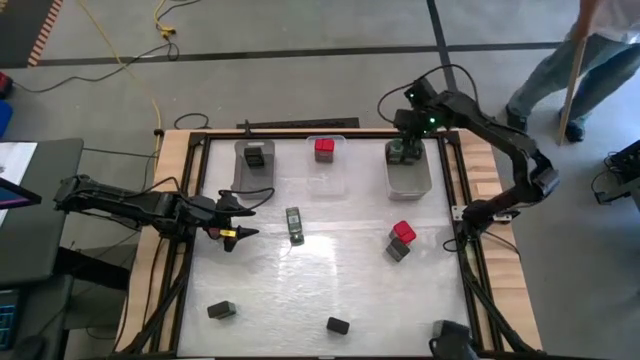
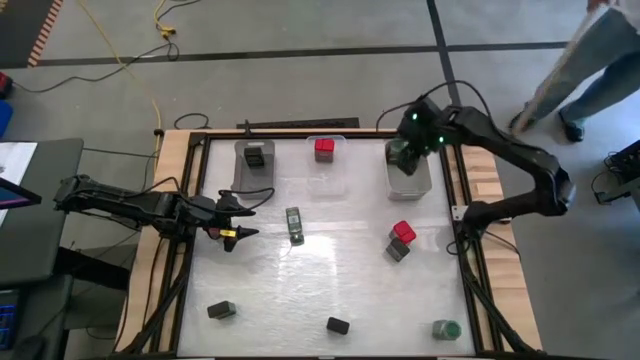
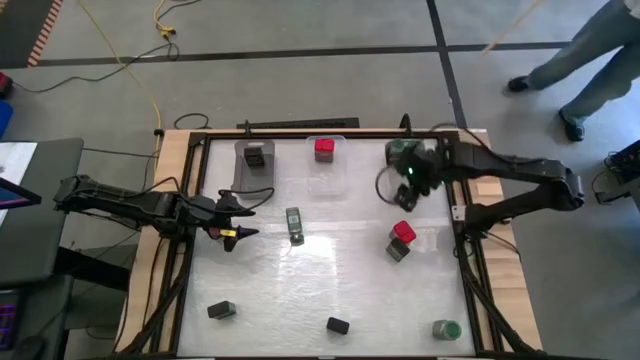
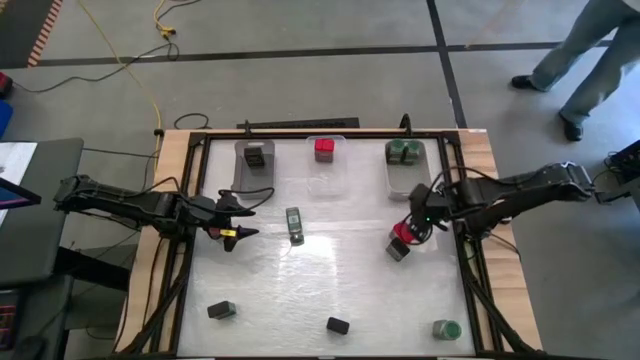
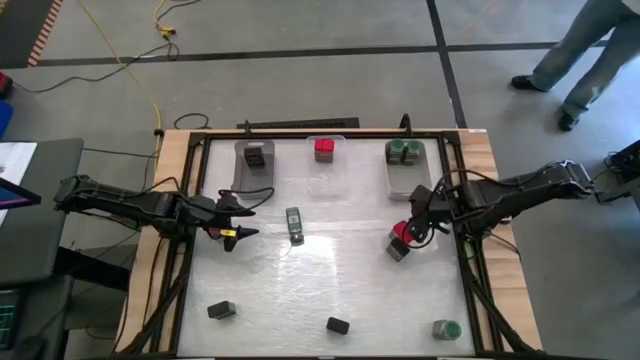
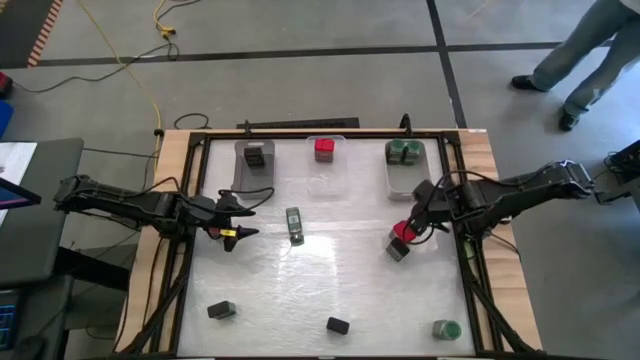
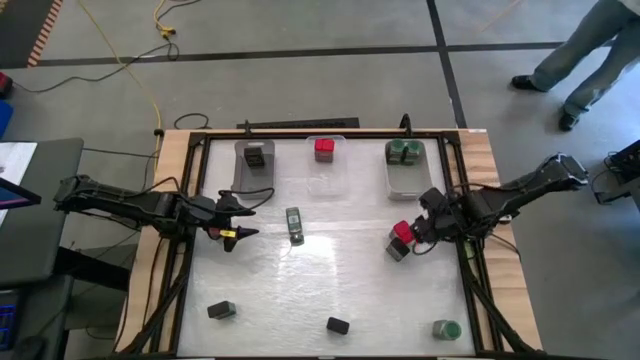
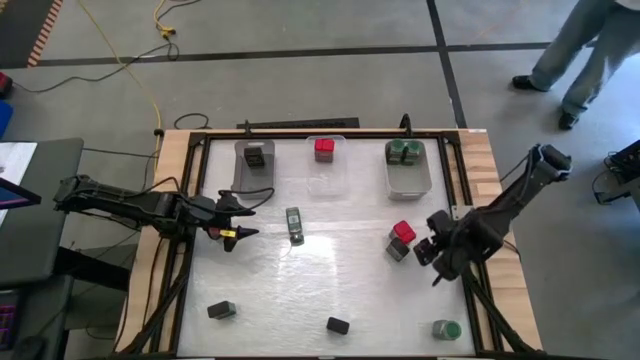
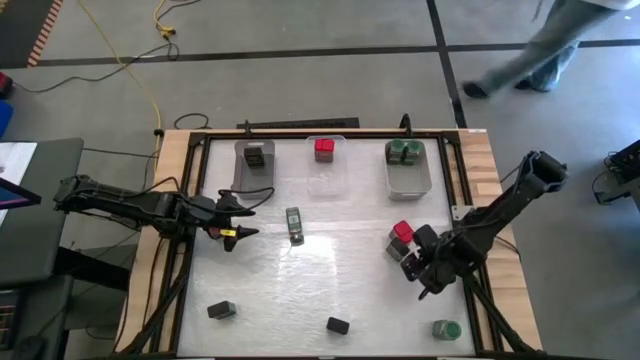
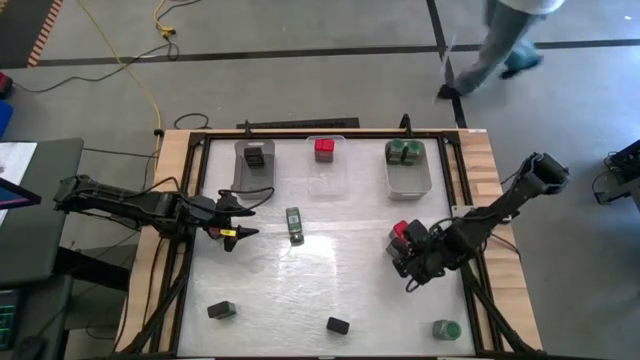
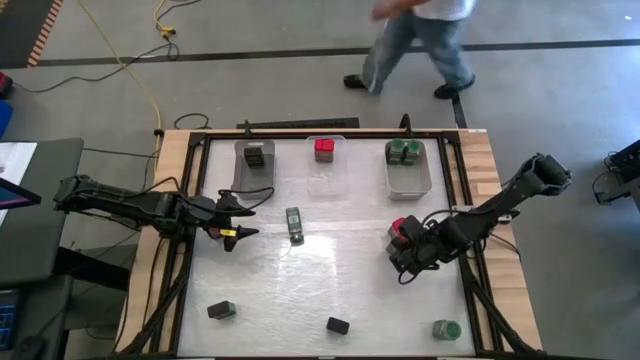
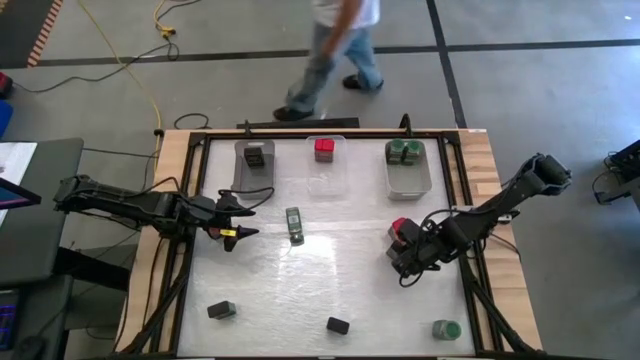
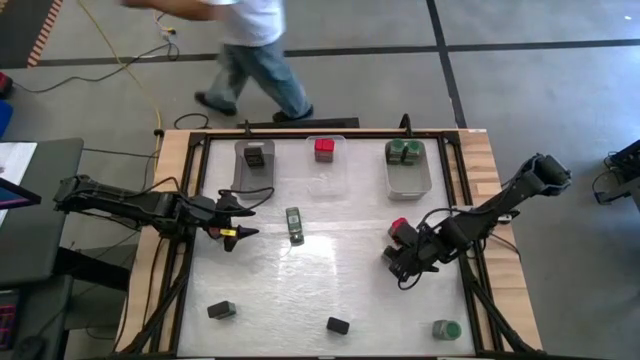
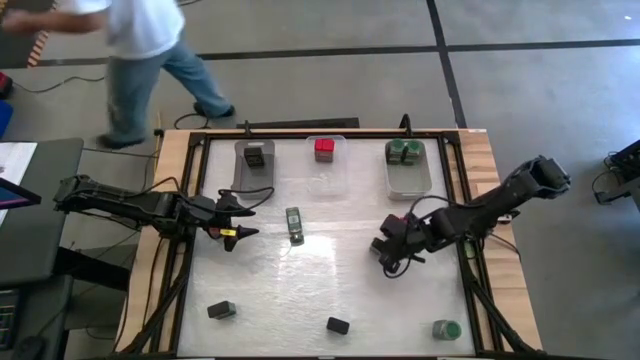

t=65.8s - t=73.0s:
Task: Sort spices by type
Put the black seasoning can into the black bin

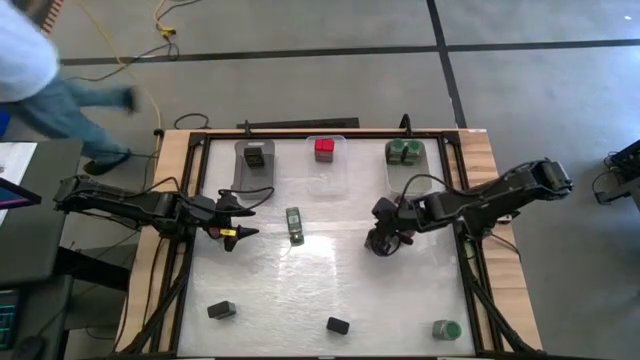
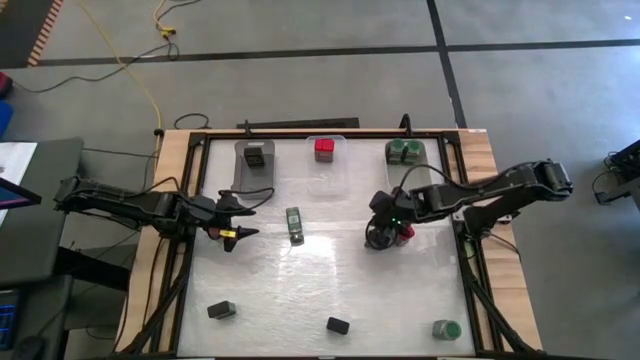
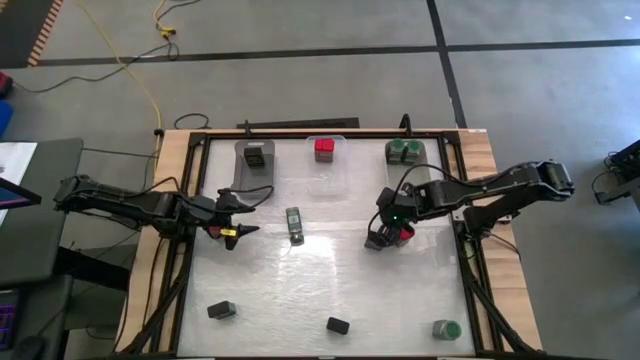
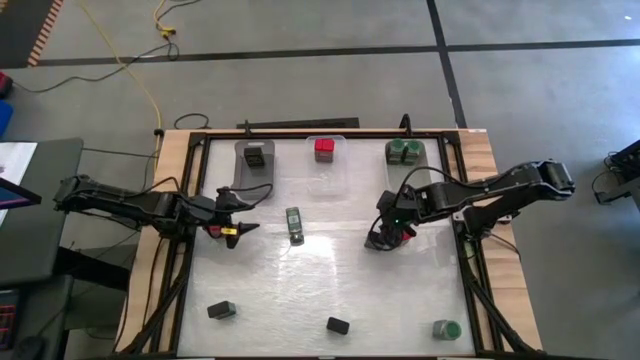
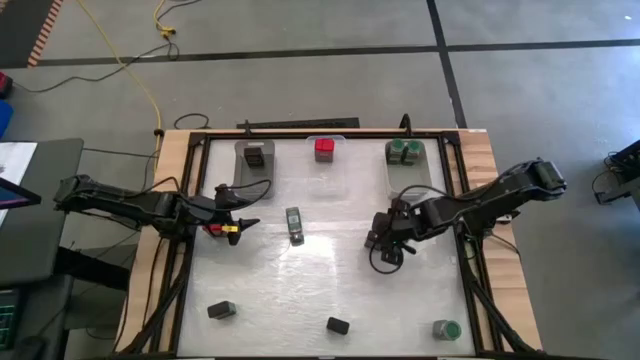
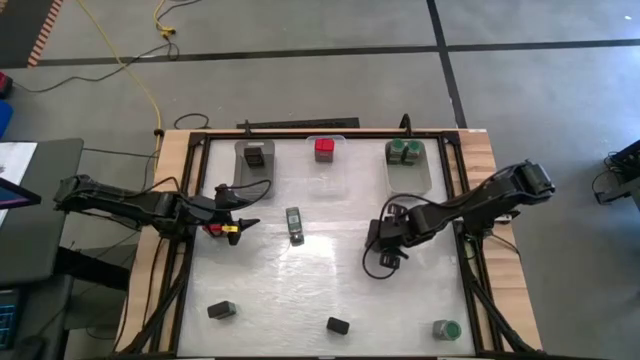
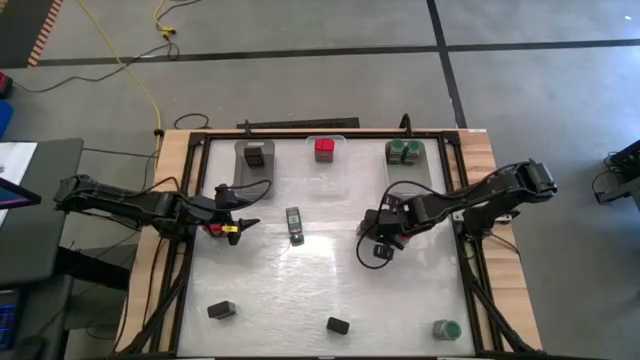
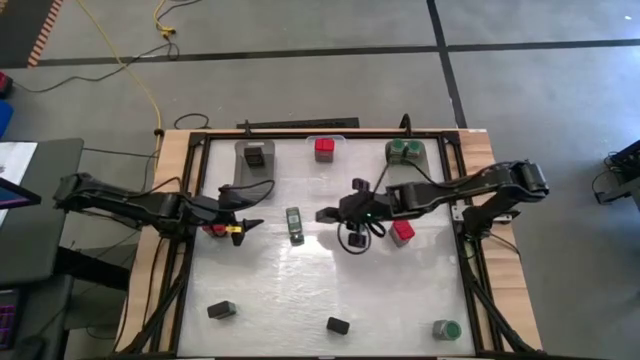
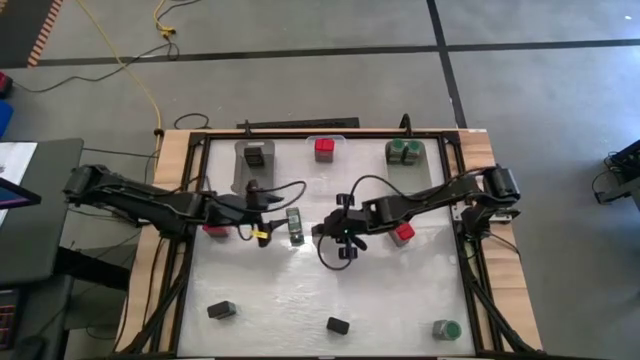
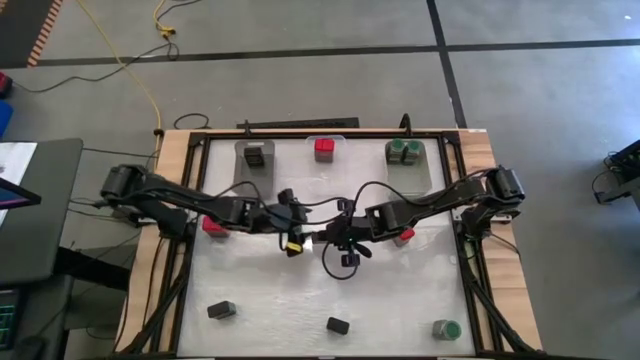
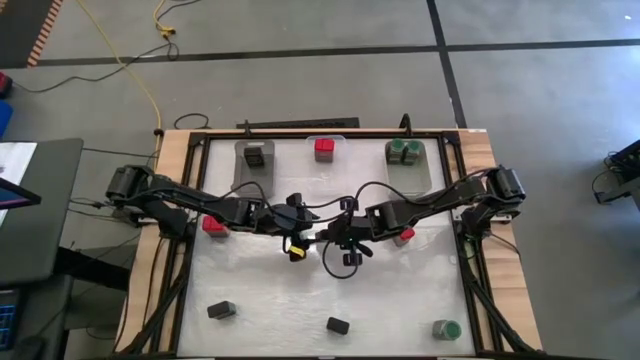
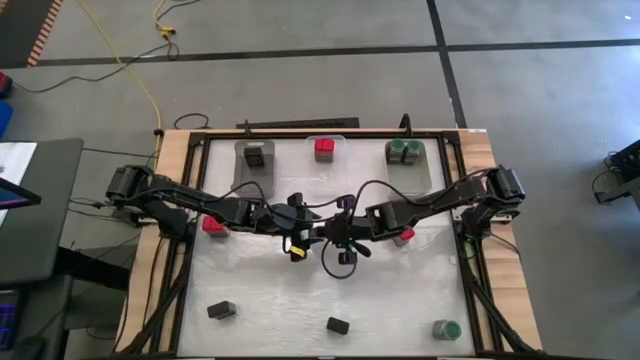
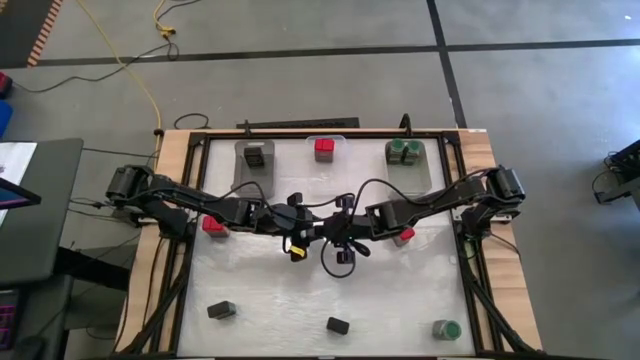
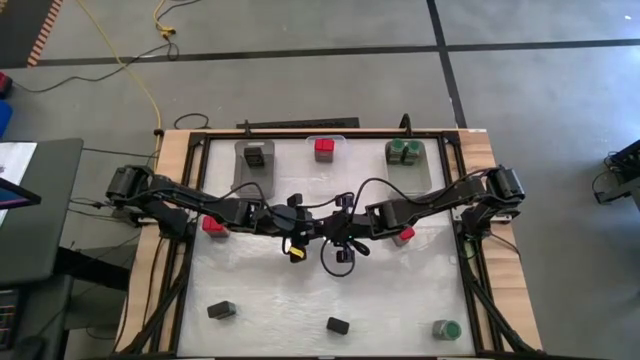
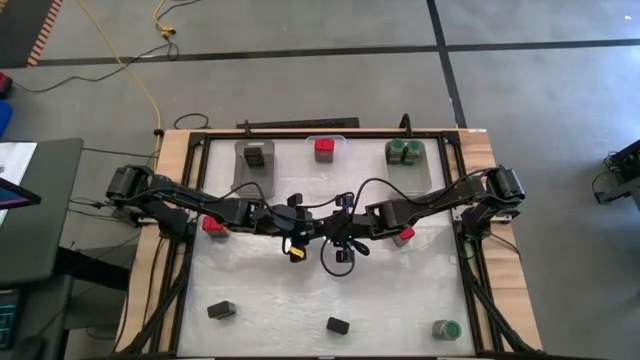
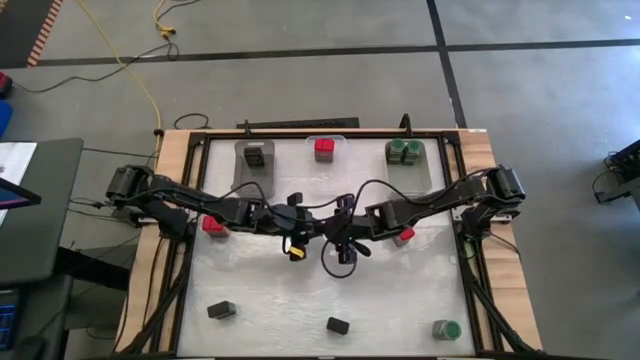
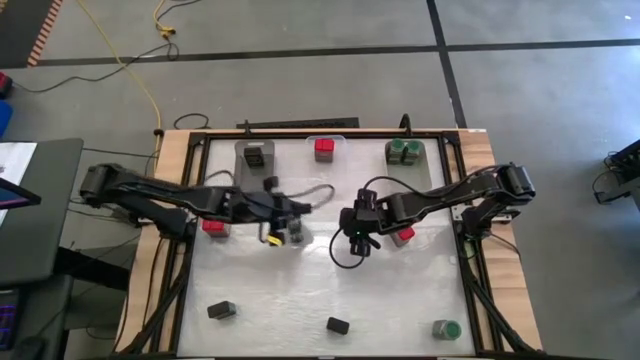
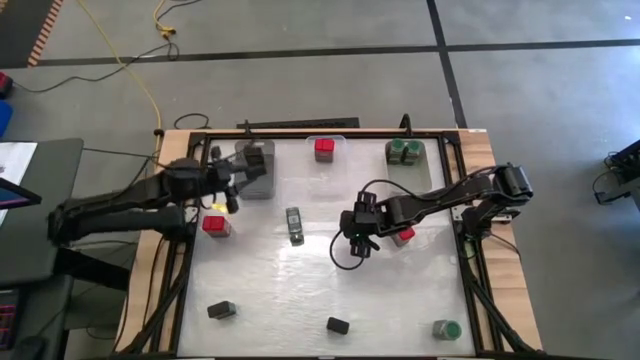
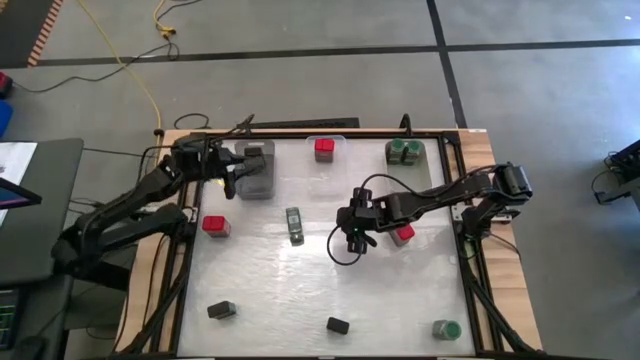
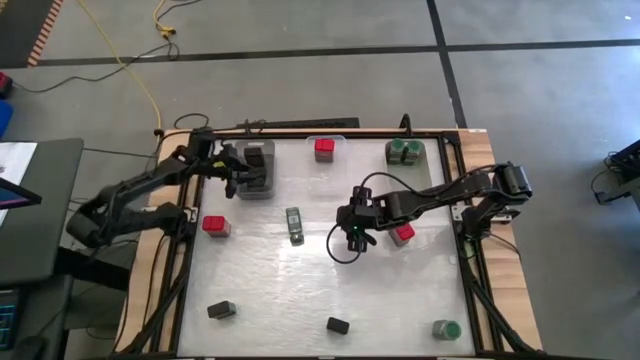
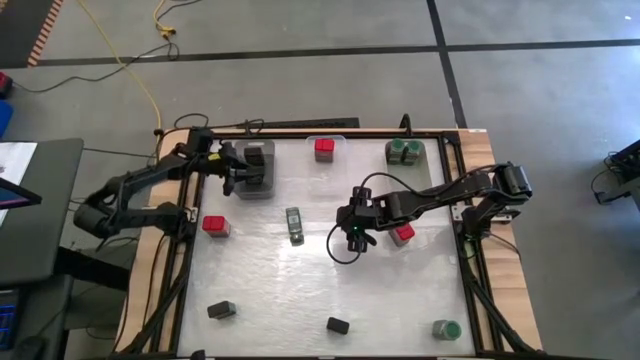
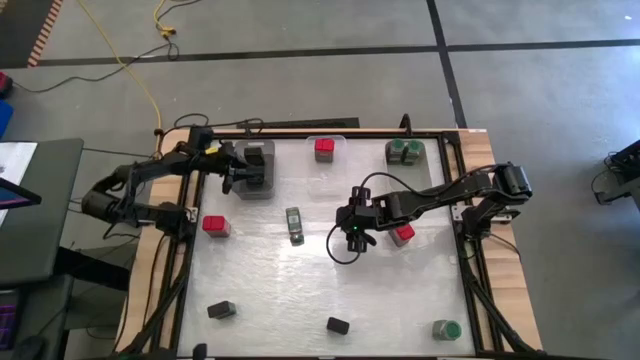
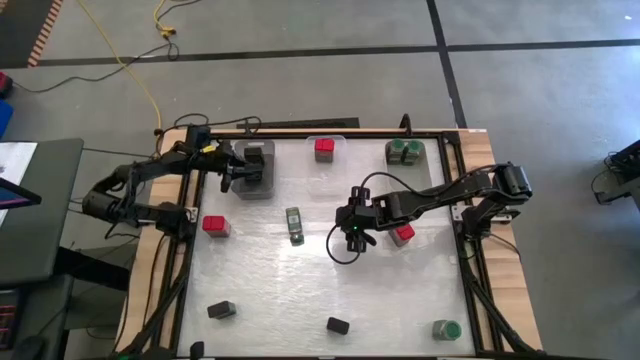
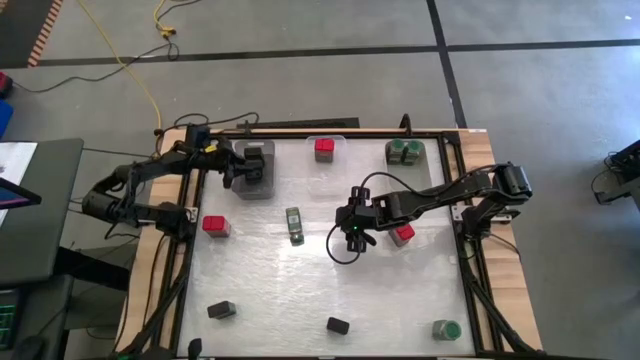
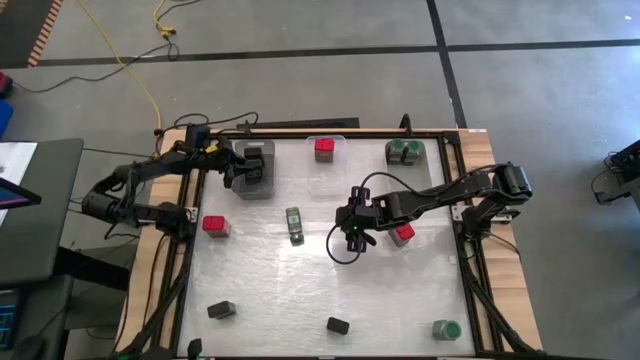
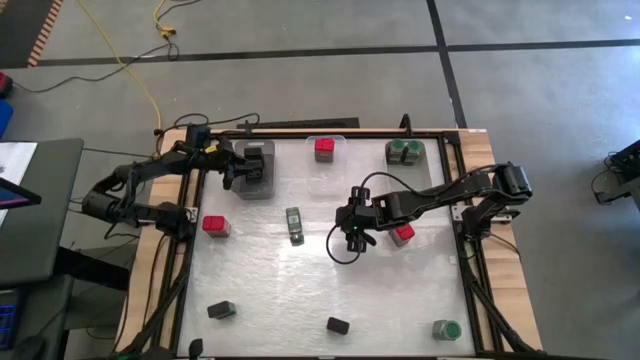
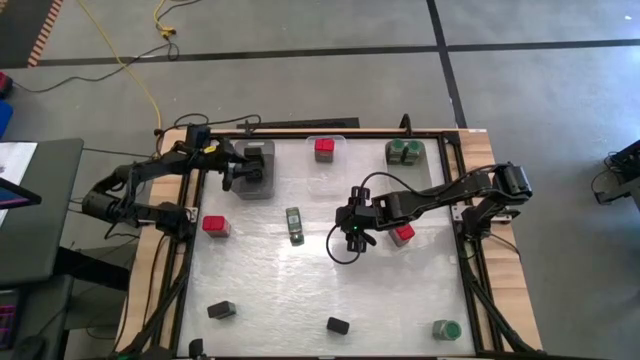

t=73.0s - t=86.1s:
Put the black seasoning can into the black bin
